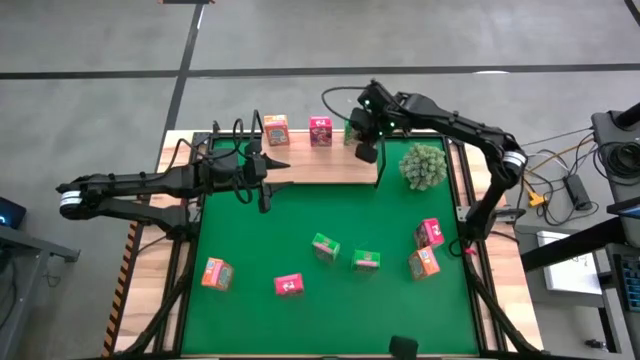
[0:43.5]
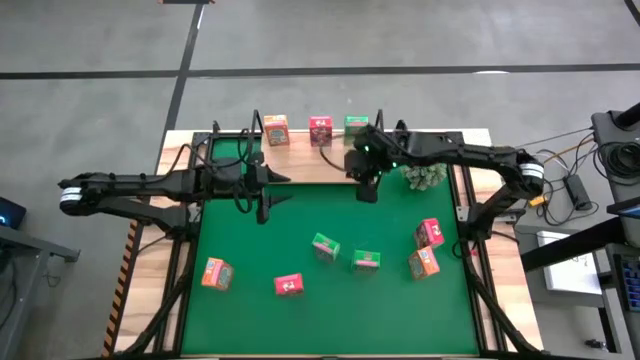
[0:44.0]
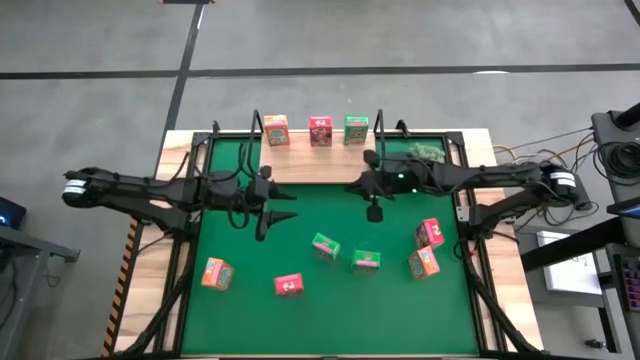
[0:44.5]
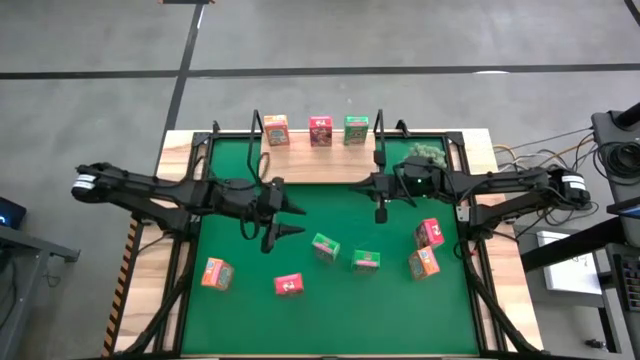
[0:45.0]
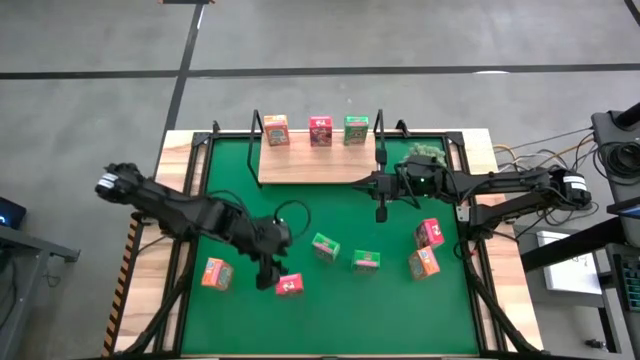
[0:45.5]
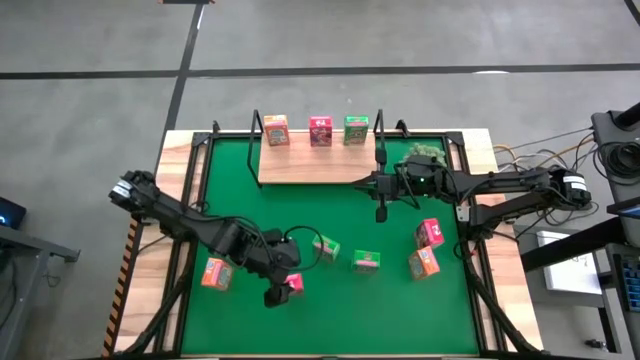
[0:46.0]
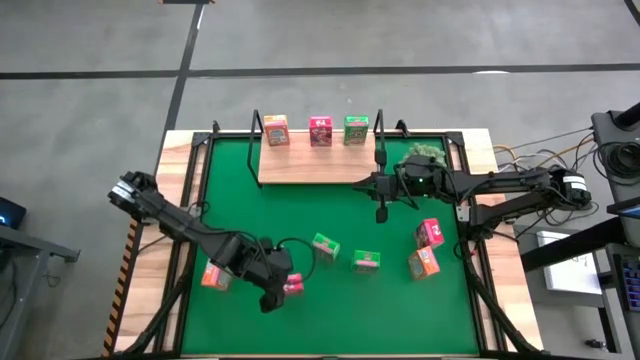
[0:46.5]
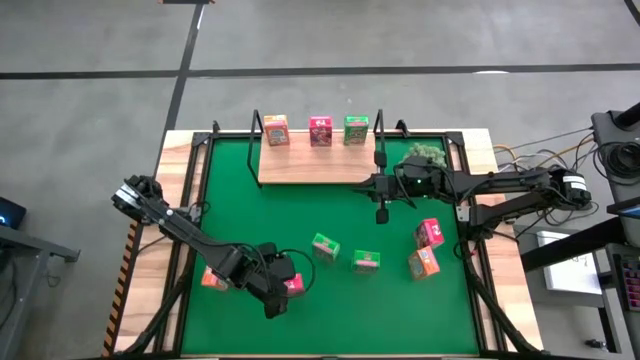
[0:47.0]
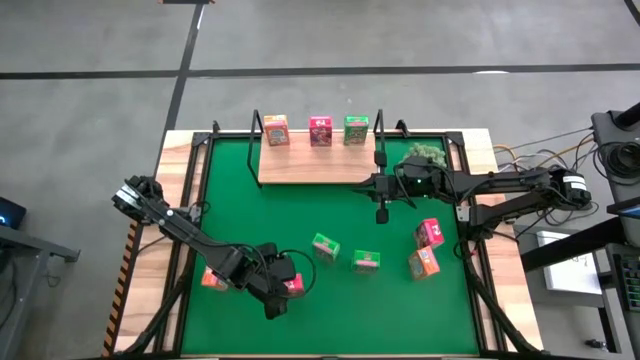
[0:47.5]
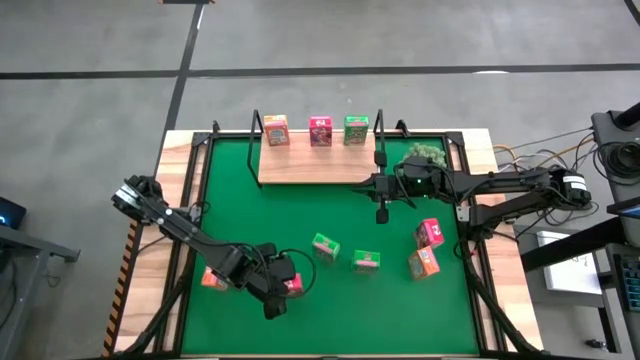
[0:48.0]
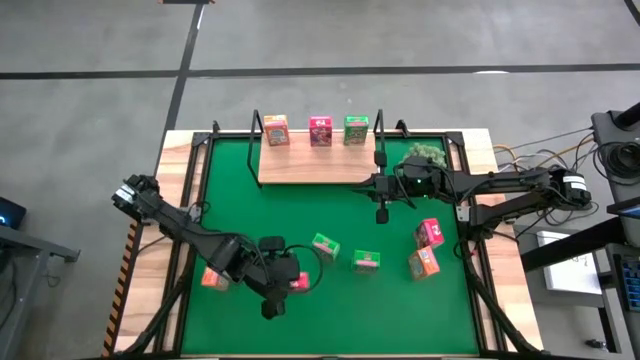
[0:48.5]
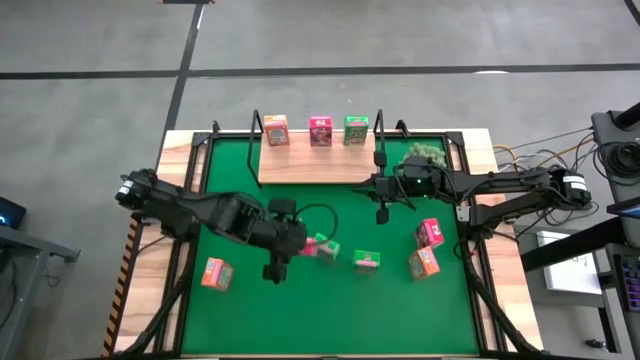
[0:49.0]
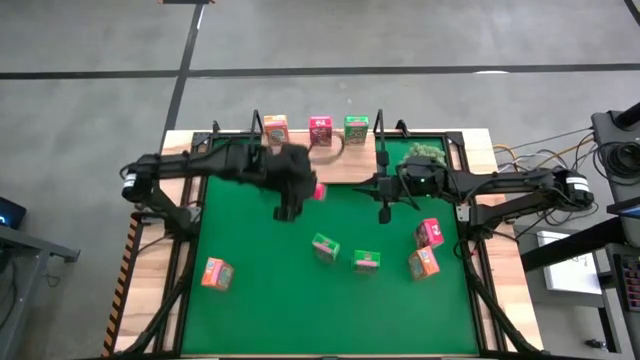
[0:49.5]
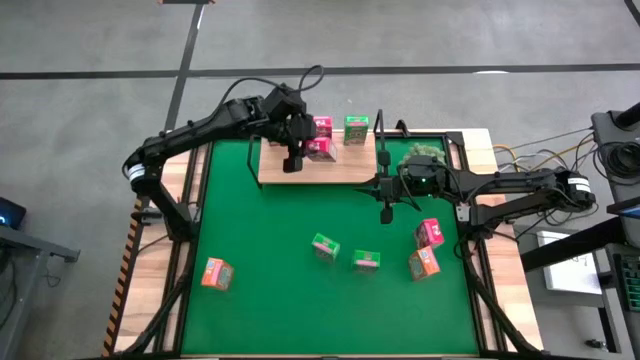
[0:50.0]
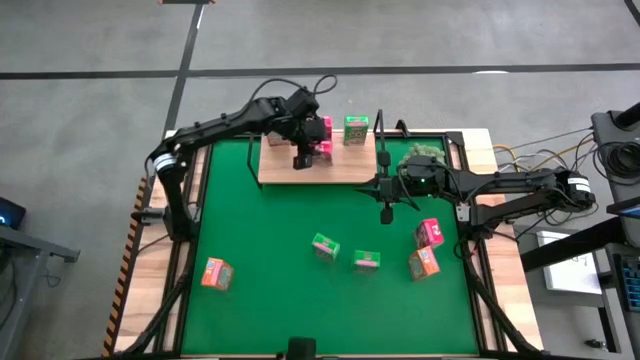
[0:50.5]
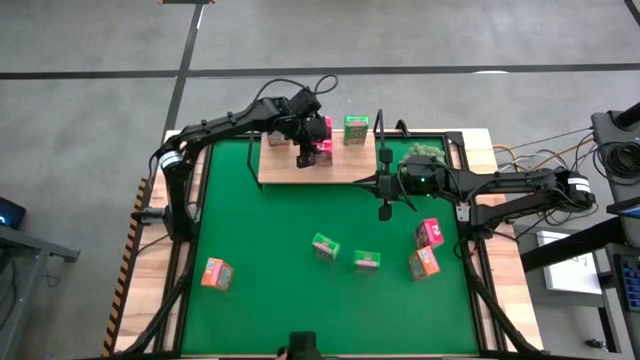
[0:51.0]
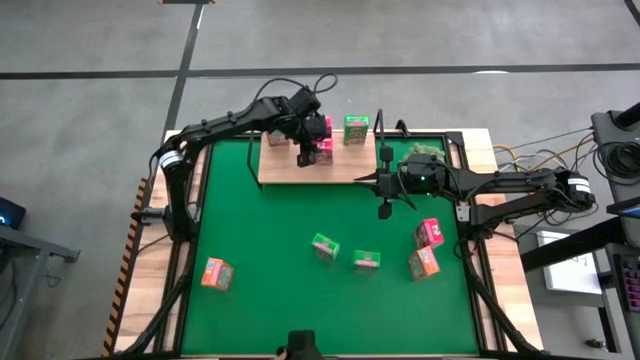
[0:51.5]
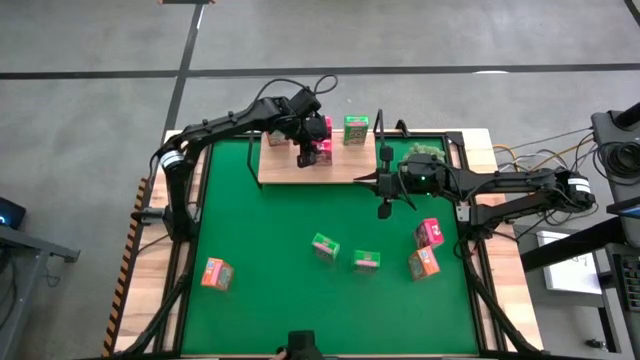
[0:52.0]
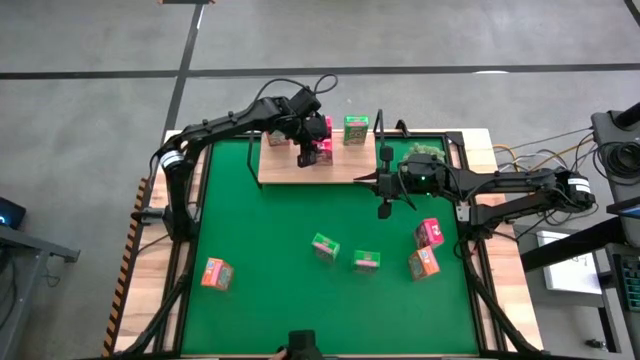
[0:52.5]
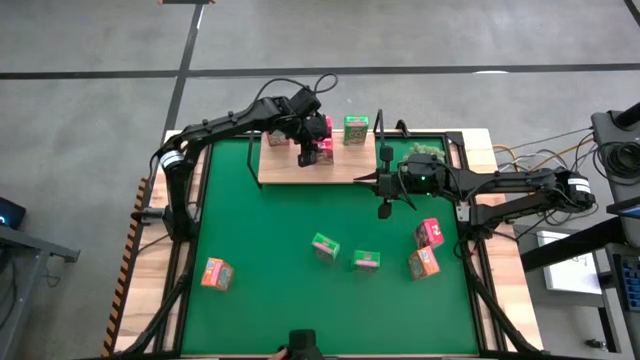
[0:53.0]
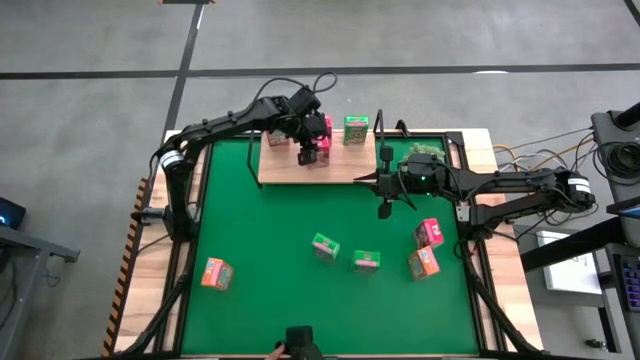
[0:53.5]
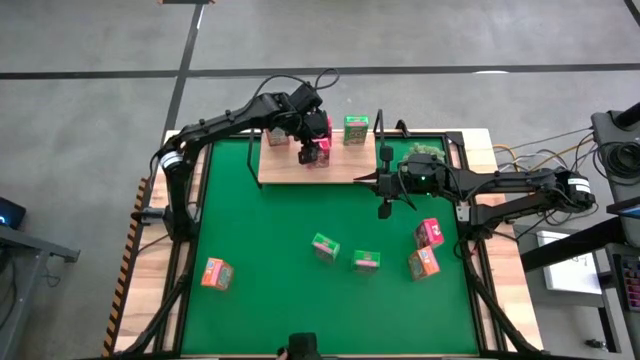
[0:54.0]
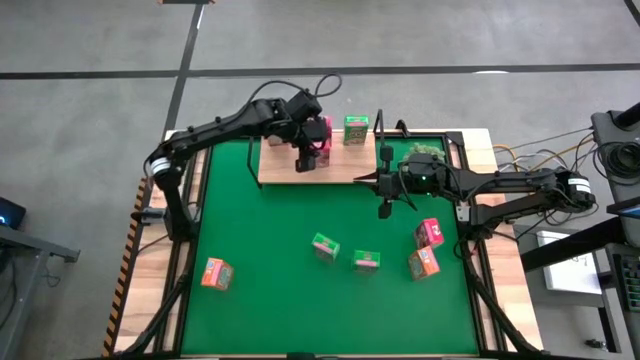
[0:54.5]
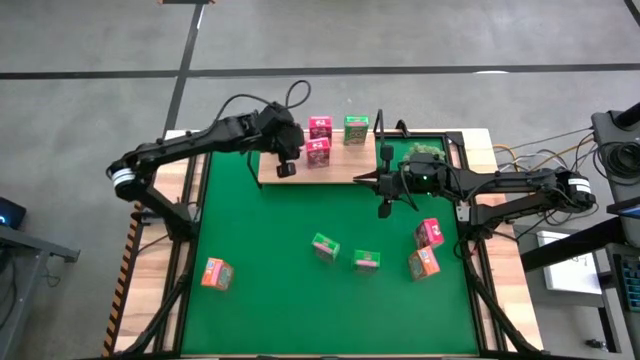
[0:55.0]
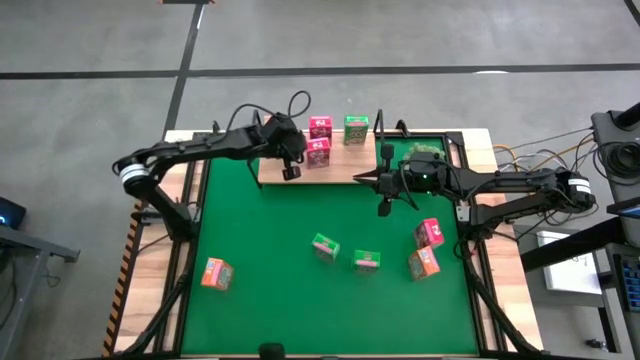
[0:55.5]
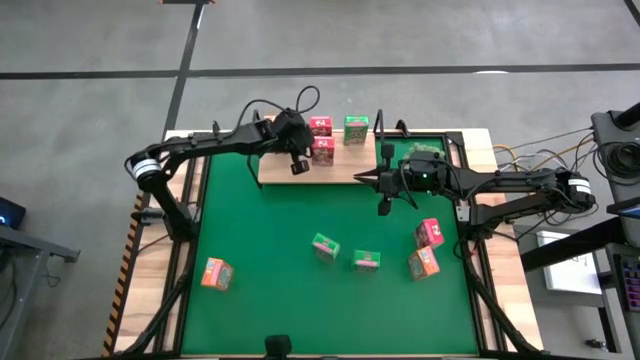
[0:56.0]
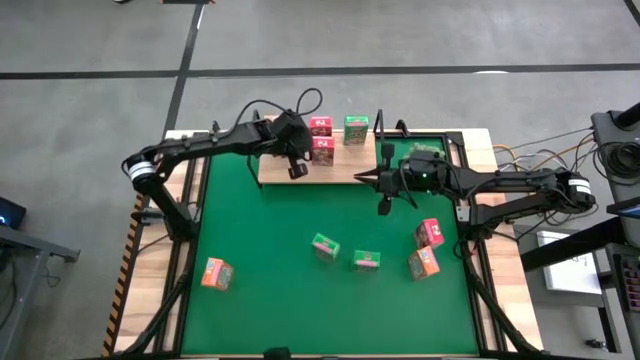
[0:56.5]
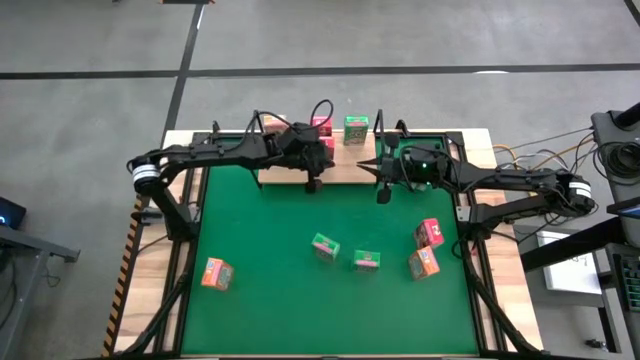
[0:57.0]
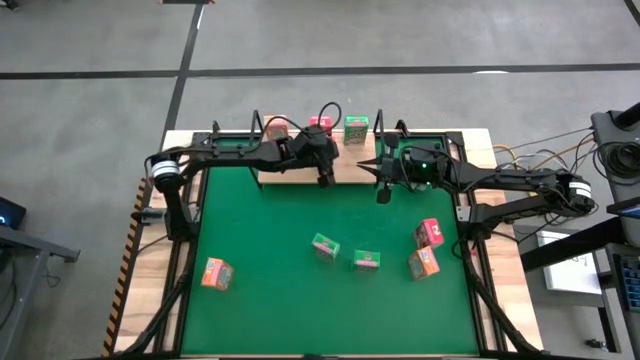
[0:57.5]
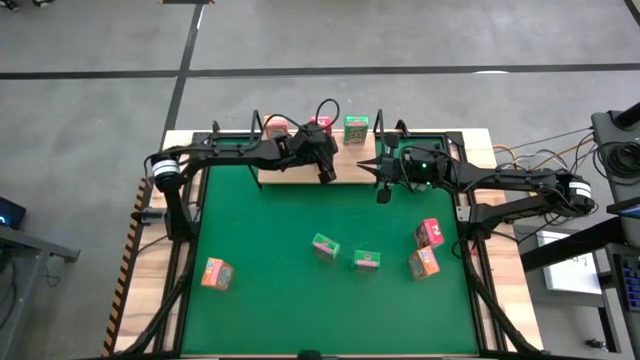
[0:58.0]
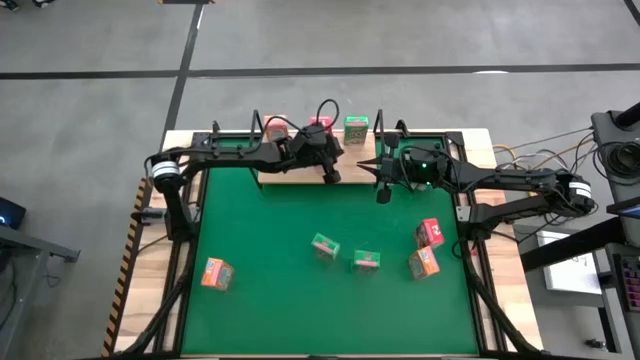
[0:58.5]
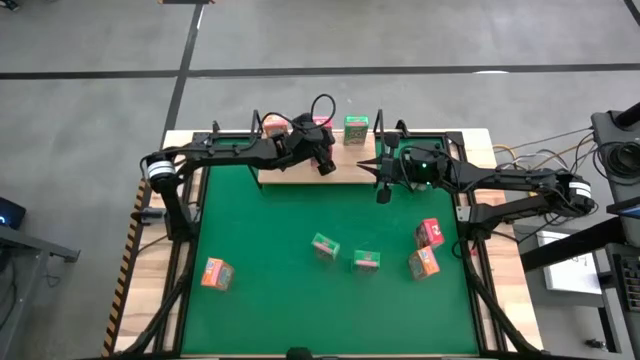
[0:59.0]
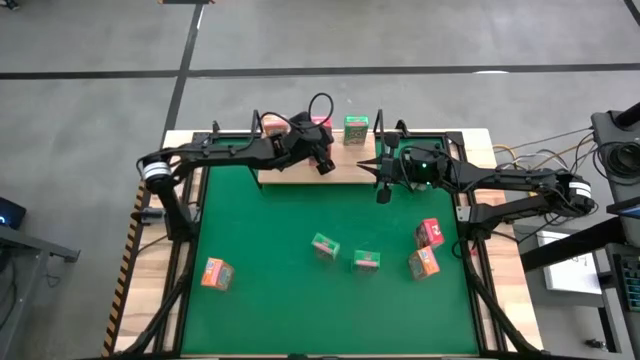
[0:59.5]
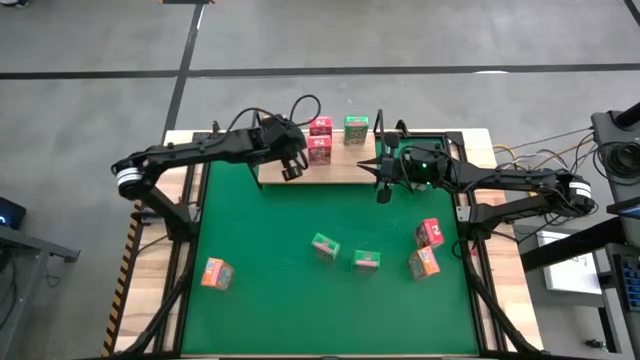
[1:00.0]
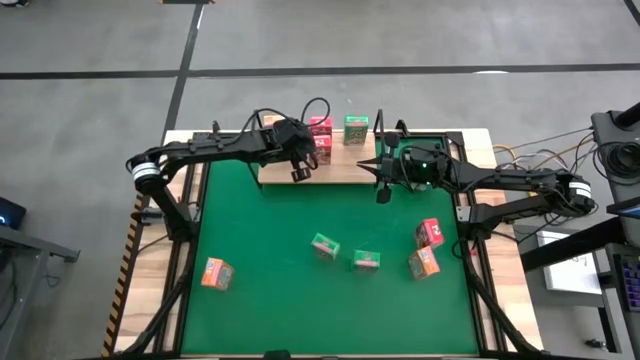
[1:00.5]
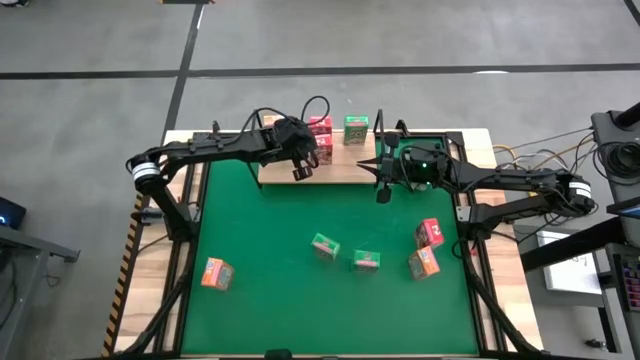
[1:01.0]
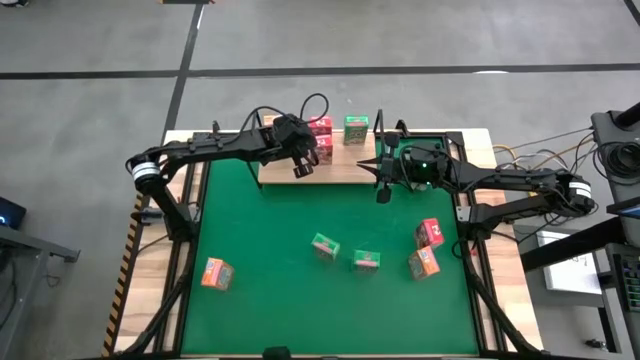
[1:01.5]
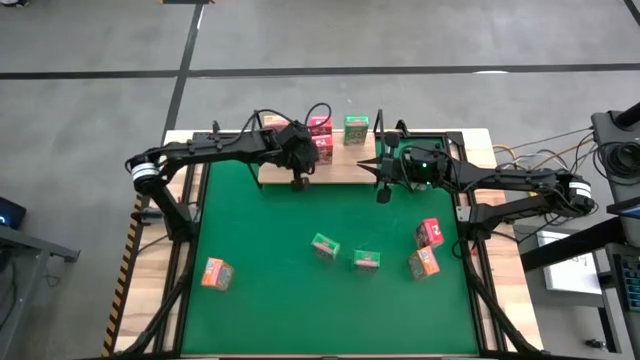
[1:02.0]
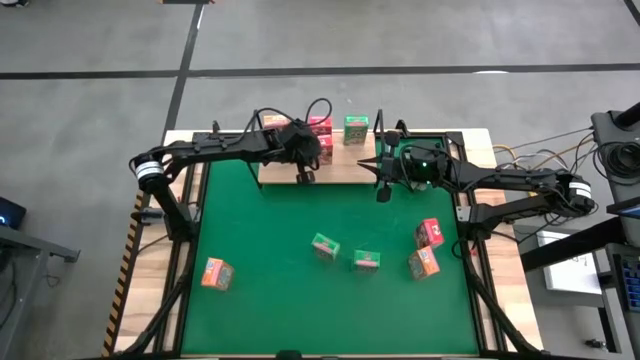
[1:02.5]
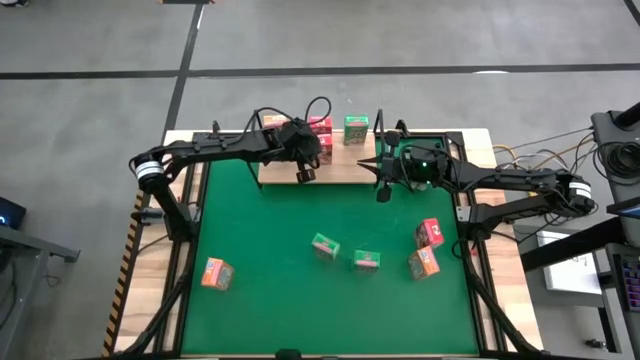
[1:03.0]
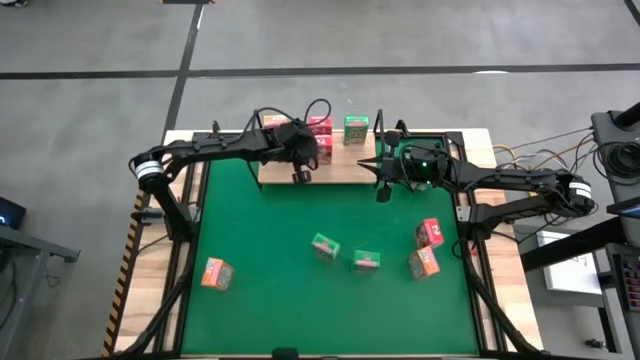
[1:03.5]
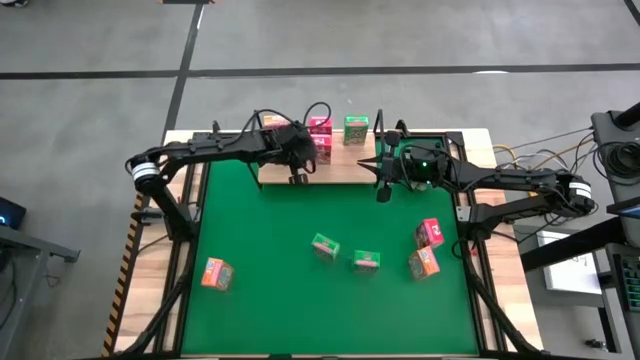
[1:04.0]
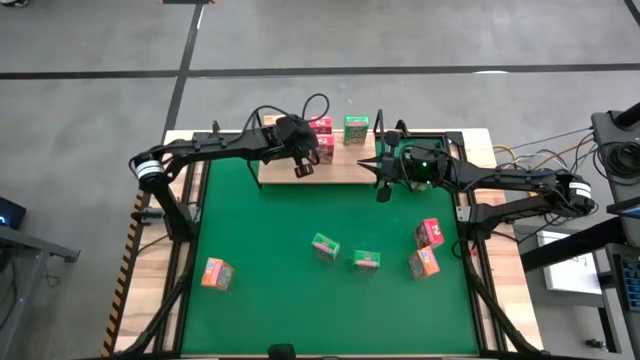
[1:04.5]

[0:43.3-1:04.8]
Task: Stack cereal on shelf
Put the bottom red cereal box on the shelf aligned with the other red cereal box
